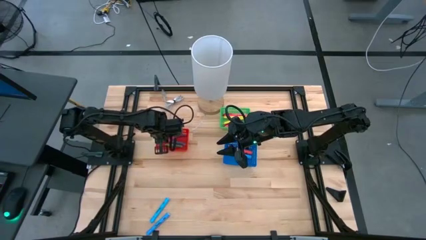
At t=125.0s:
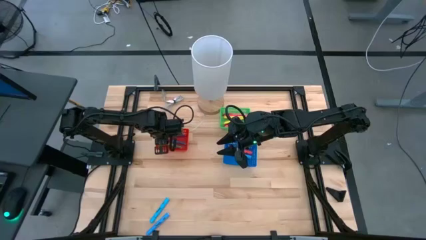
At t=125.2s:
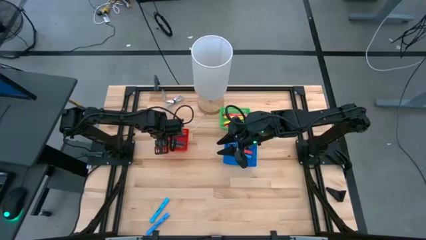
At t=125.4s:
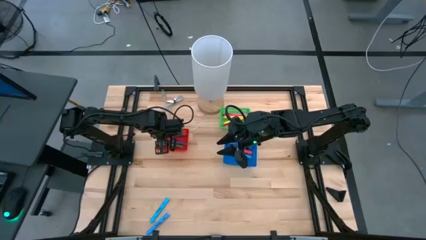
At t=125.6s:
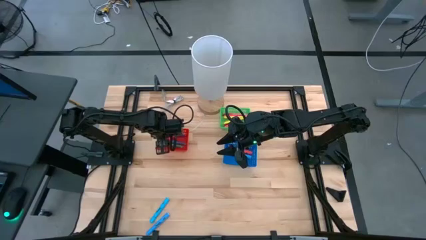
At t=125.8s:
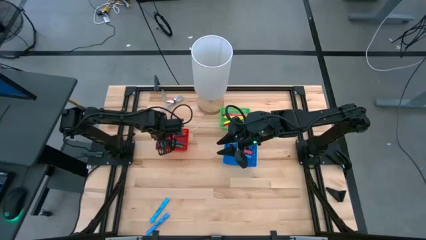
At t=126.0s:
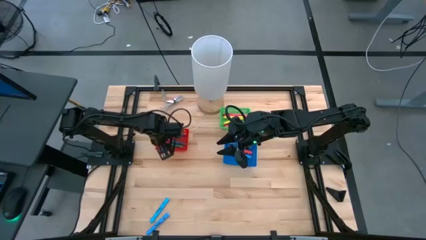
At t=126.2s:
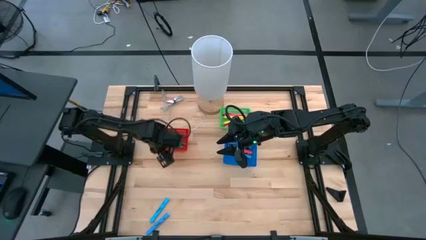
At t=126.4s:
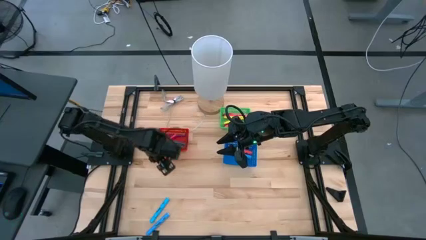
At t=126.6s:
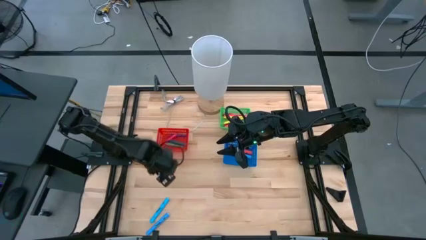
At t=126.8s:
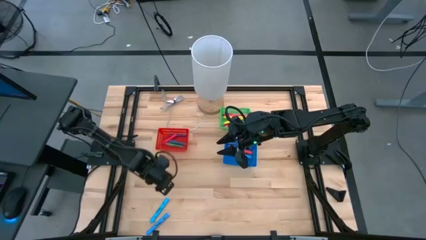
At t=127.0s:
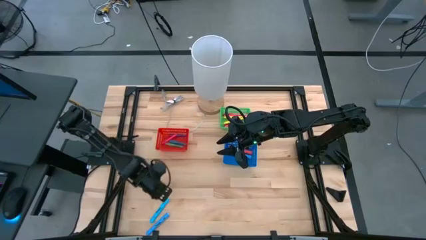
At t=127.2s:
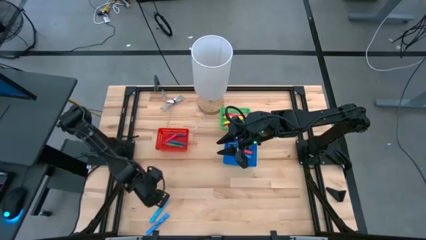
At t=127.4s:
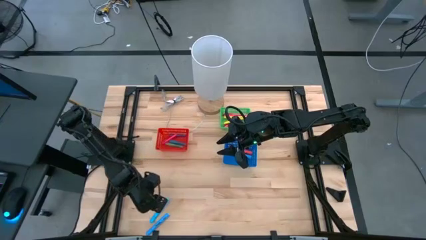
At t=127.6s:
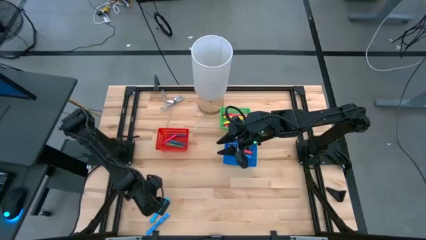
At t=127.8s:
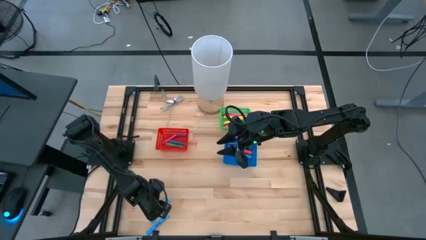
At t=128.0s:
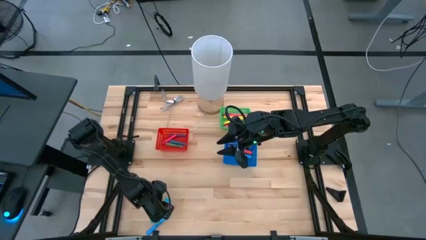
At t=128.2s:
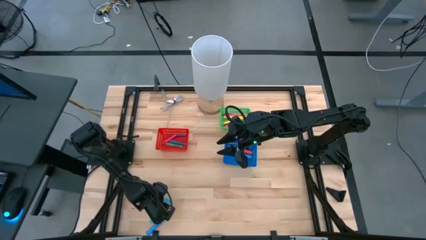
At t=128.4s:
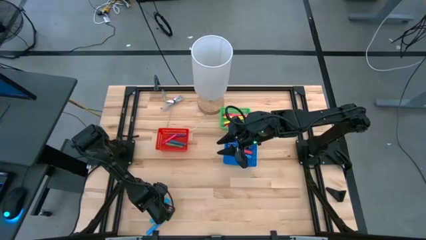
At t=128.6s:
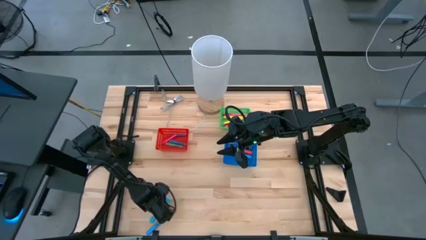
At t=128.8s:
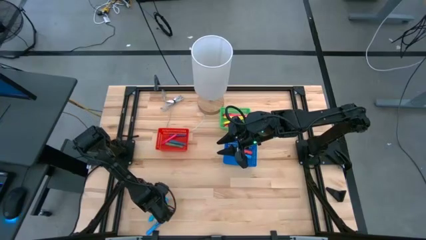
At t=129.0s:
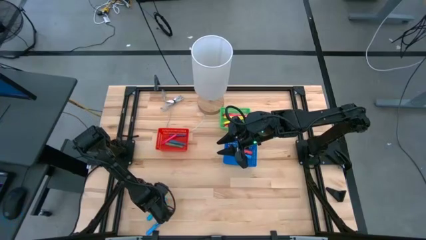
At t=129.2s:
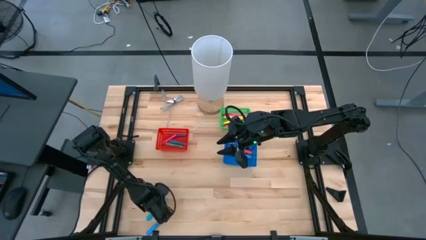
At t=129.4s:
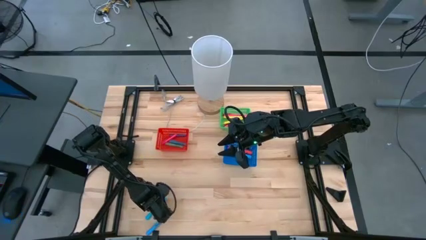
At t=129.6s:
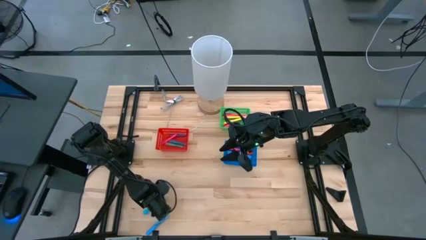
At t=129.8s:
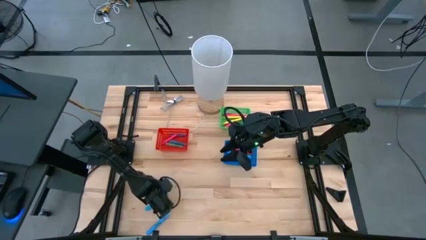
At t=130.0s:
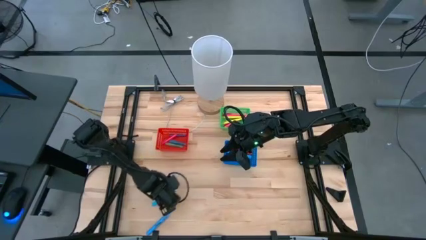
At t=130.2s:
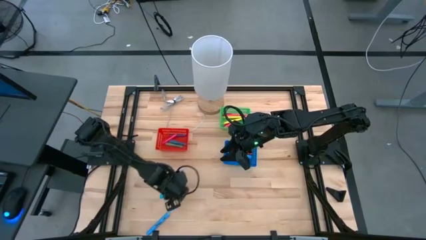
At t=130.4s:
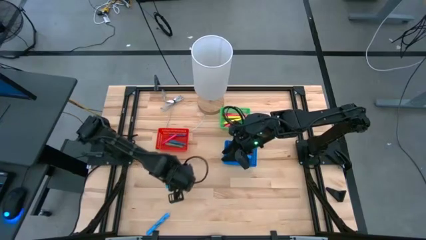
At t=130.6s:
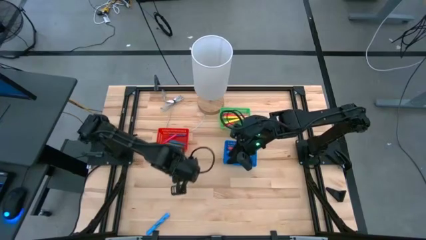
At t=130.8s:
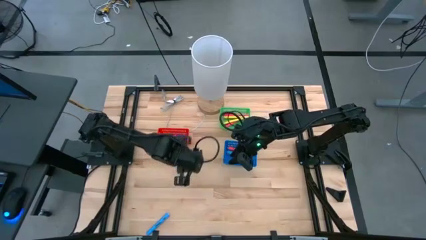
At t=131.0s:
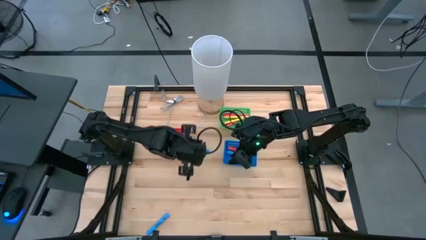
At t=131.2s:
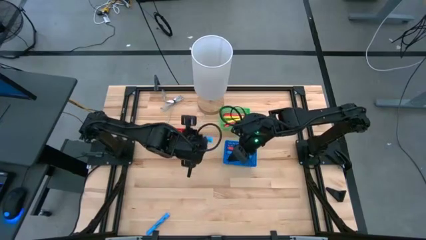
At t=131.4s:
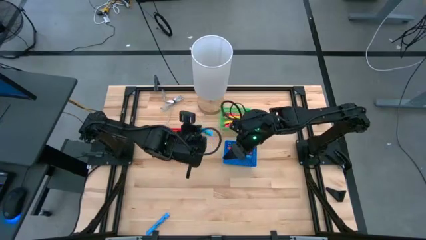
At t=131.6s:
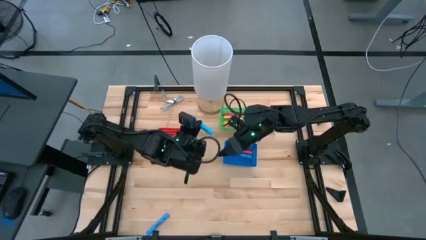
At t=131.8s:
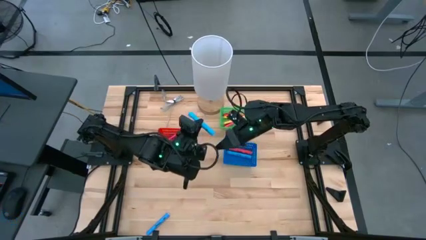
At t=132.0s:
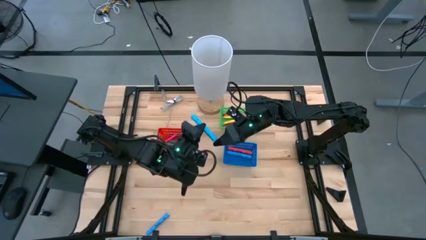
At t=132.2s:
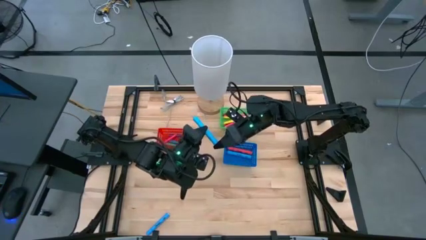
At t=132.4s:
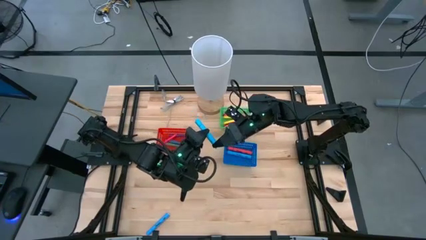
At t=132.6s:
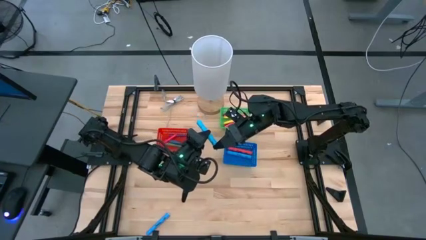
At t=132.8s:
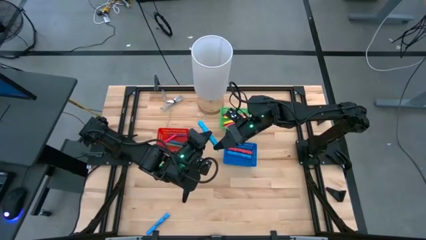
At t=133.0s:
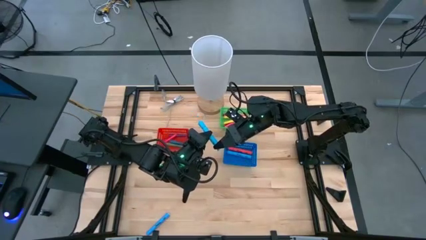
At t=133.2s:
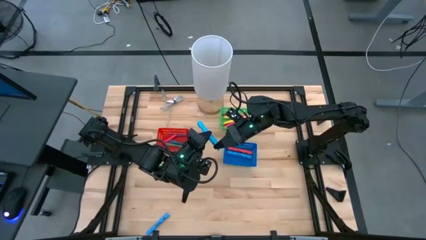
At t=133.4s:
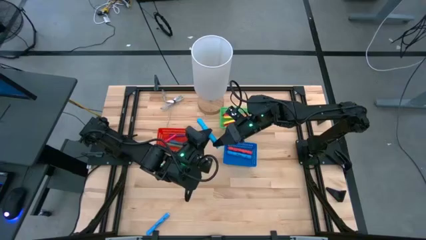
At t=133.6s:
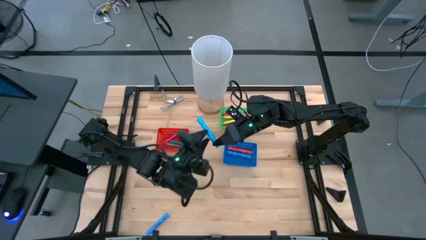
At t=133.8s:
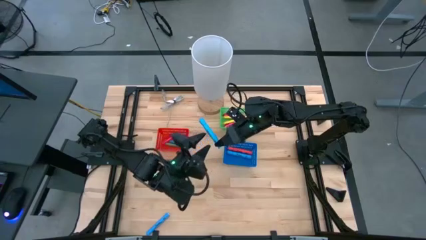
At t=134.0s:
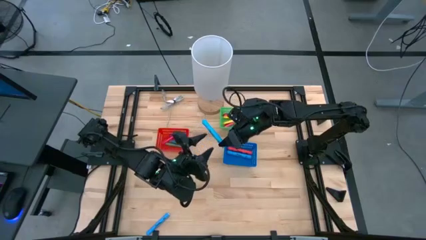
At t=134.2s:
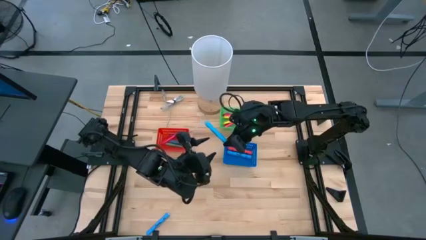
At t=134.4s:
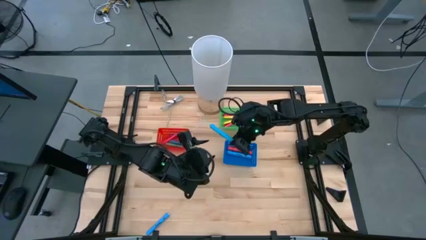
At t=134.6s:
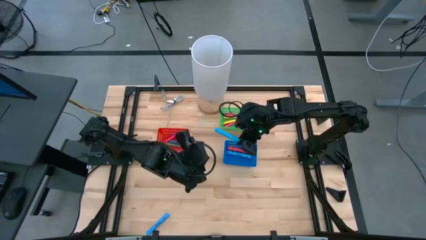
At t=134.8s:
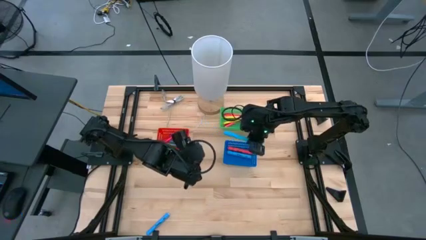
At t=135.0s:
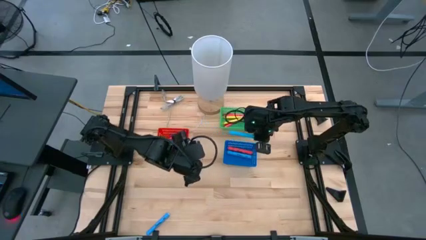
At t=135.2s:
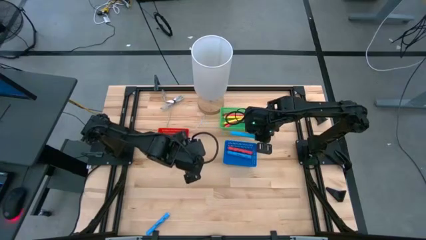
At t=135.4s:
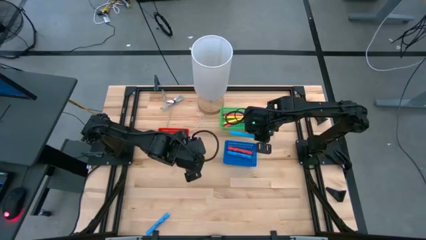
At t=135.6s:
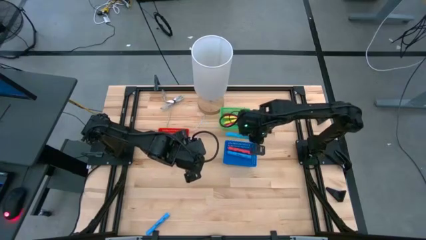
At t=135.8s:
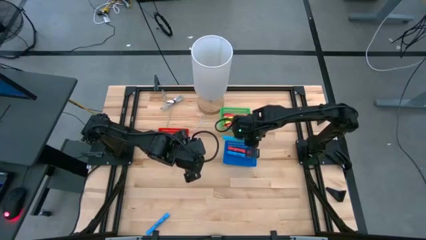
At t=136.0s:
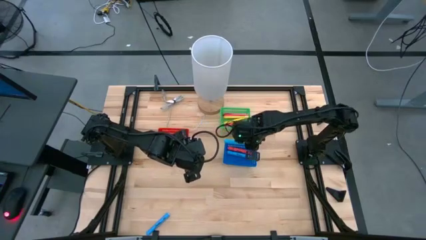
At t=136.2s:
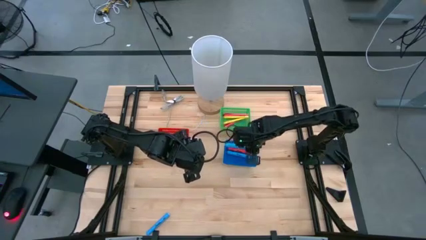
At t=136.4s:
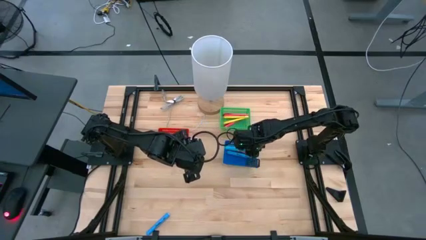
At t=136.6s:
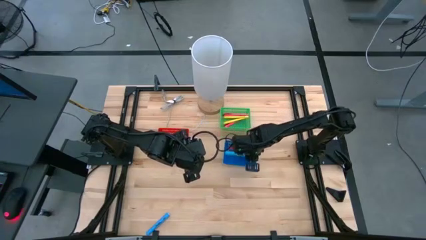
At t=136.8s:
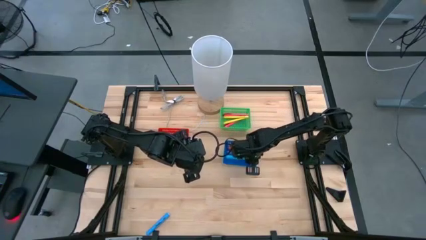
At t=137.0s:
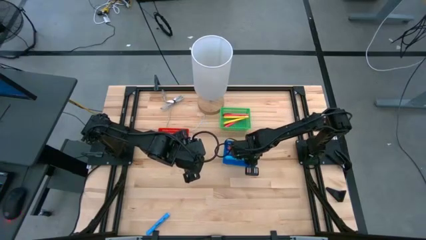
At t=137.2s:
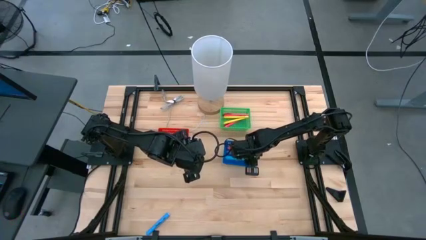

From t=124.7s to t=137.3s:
Task: Pick & Place Markers
Put the top blue highlighter into the blue bin
